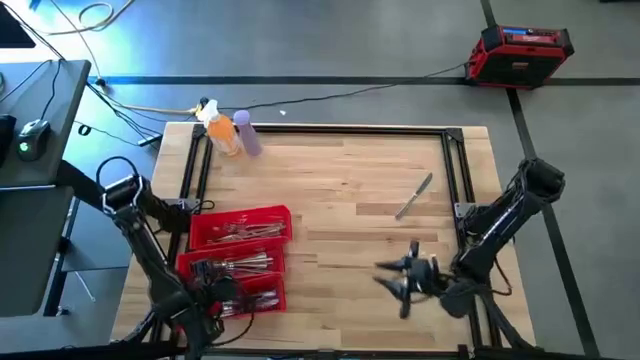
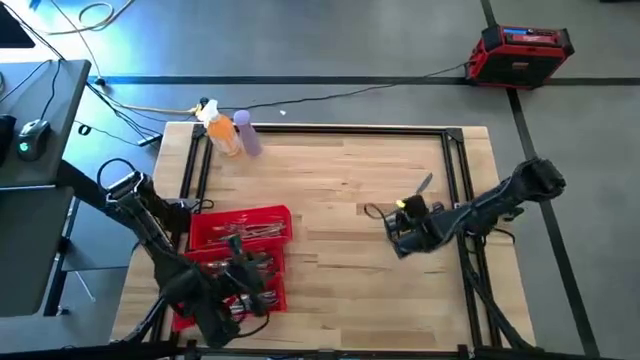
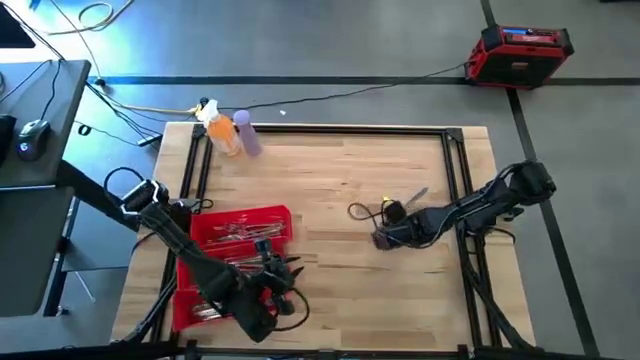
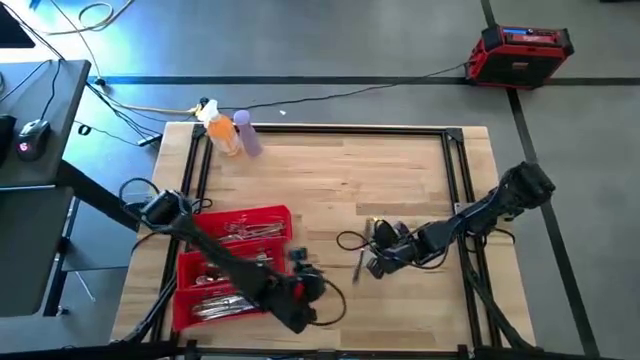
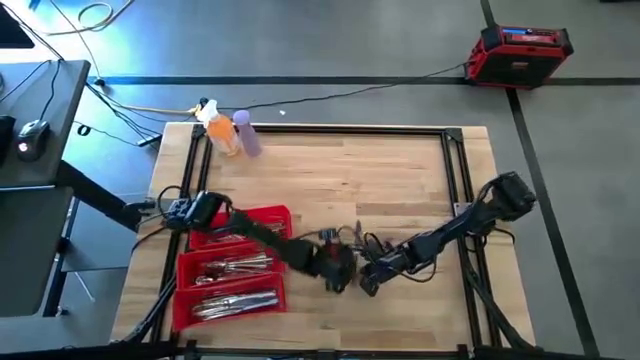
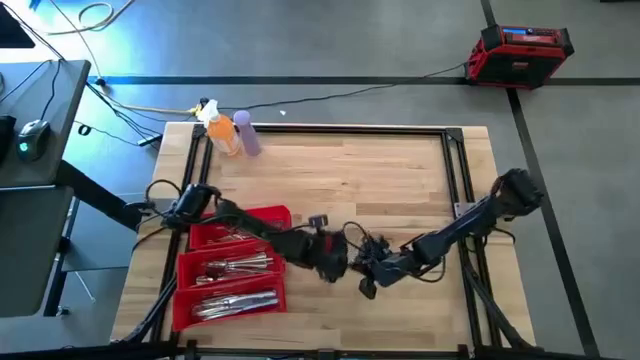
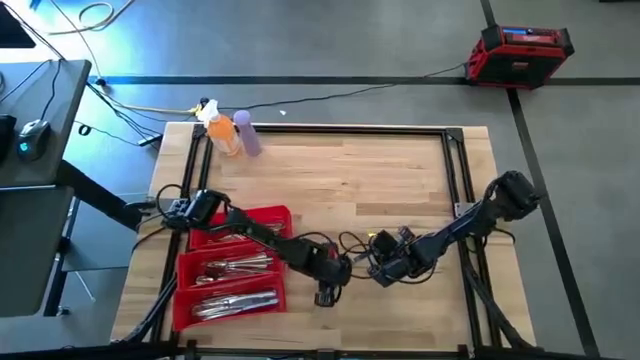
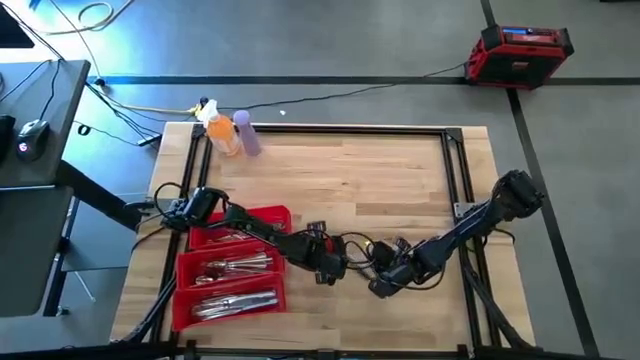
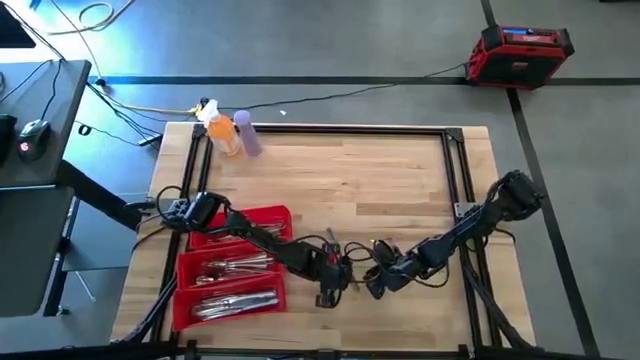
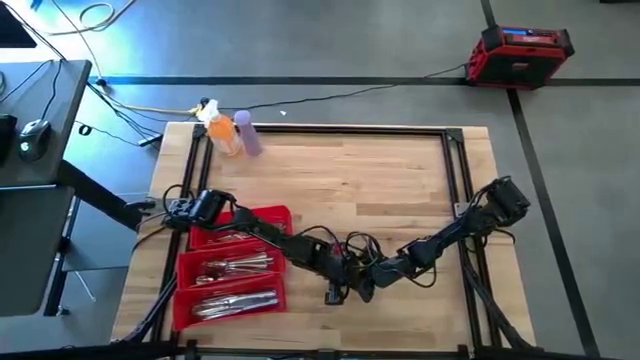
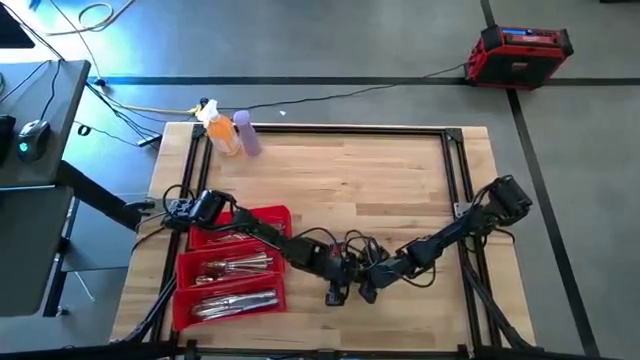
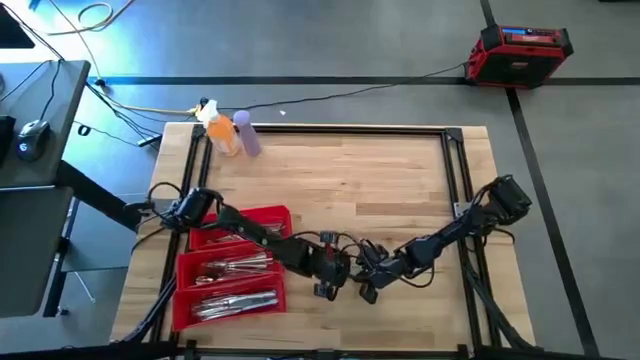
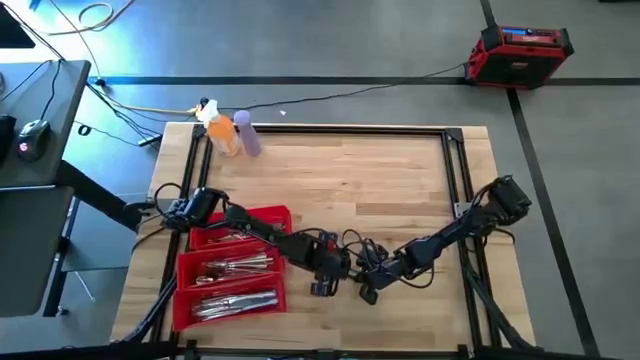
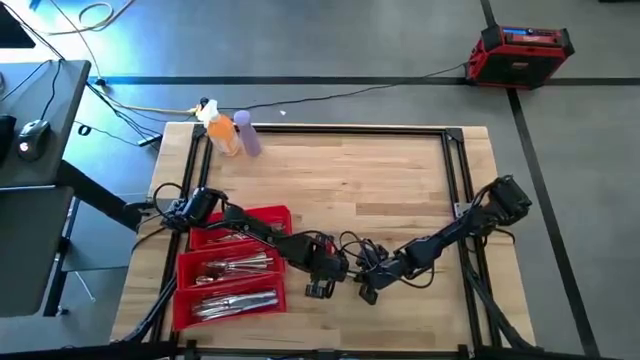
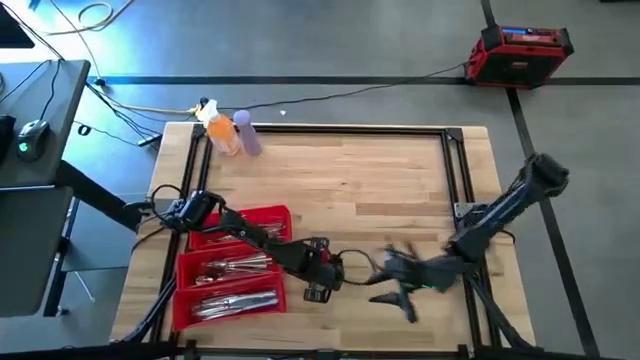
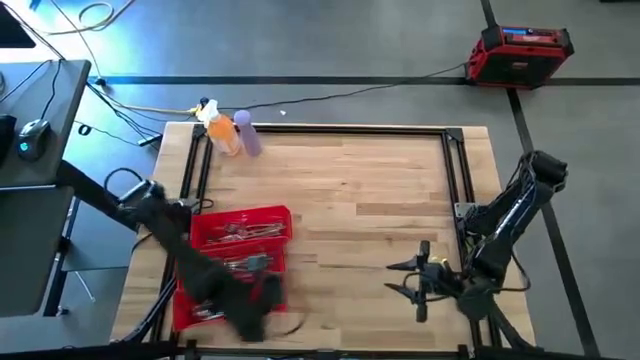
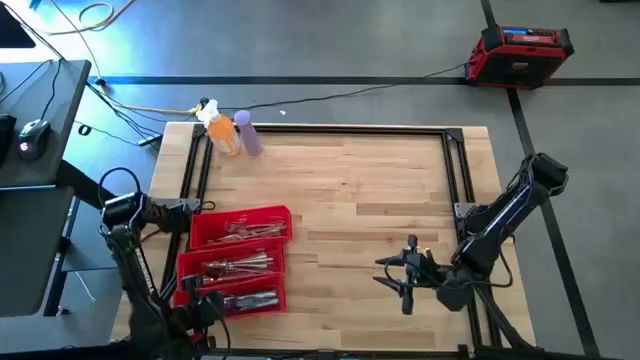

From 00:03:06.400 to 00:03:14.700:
Task: Sort silverware
Put the silver knife in the bottom red bin

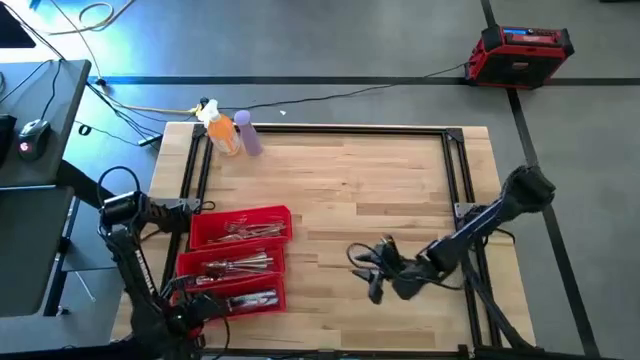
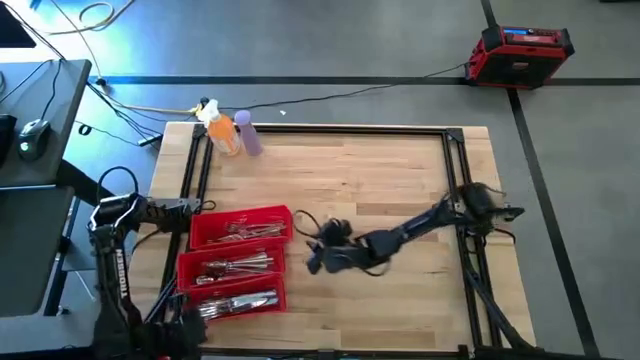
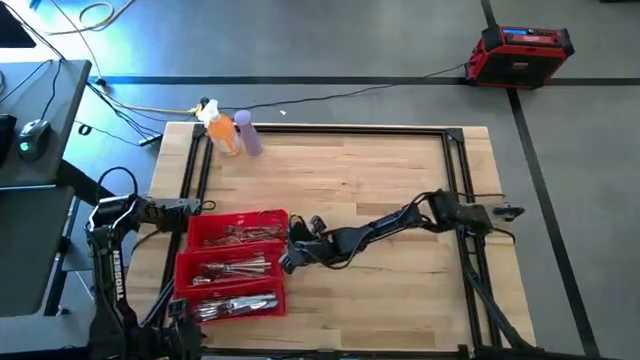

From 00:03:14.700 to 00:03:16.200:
Adjust the top red bin

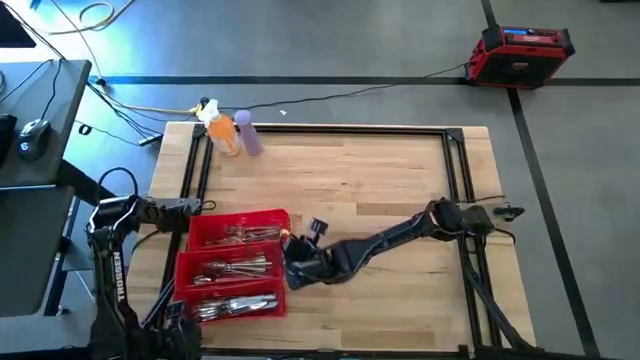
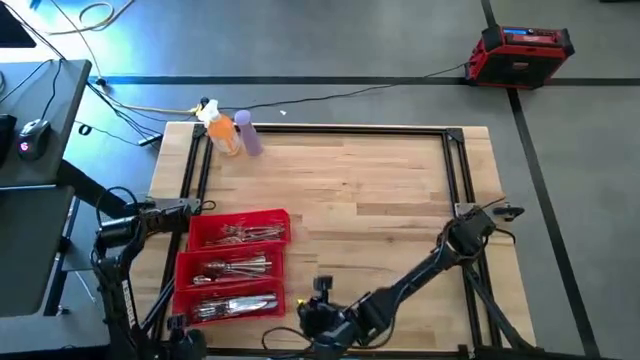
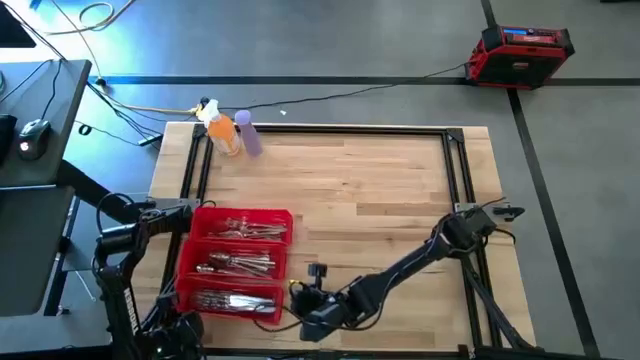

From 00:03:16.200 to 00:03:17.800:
Adjust the bottom red bin

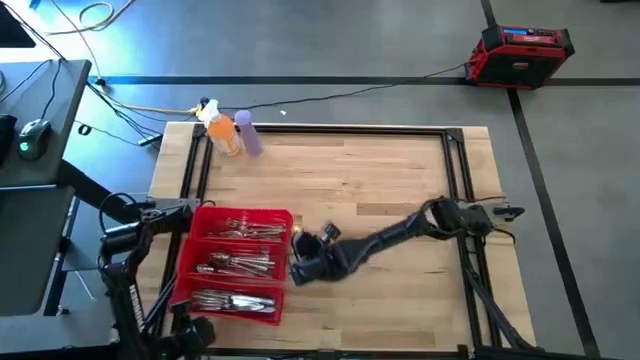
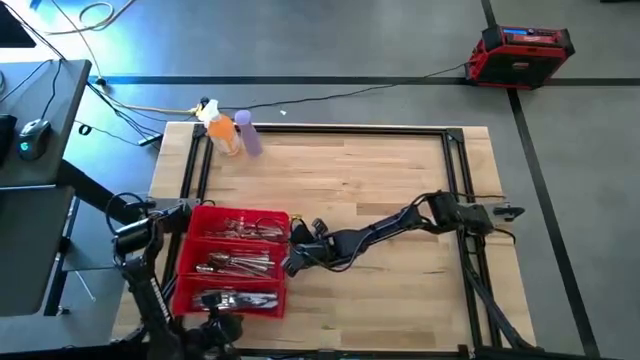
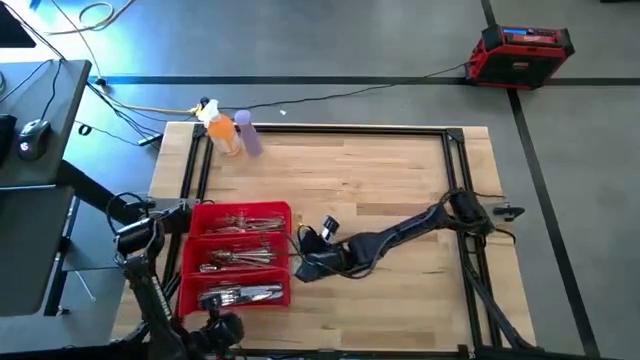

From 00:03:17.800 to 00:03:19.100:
Adjust the bins

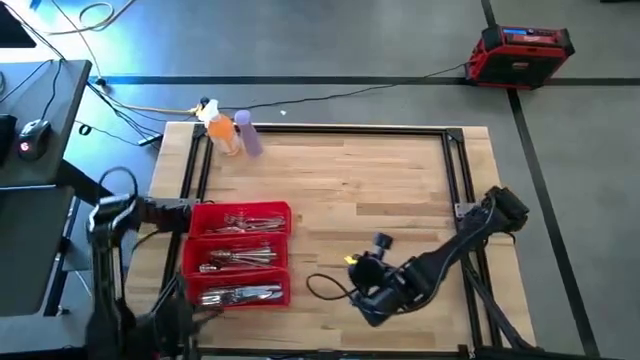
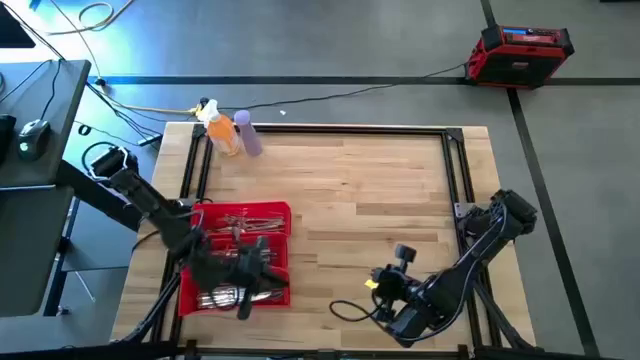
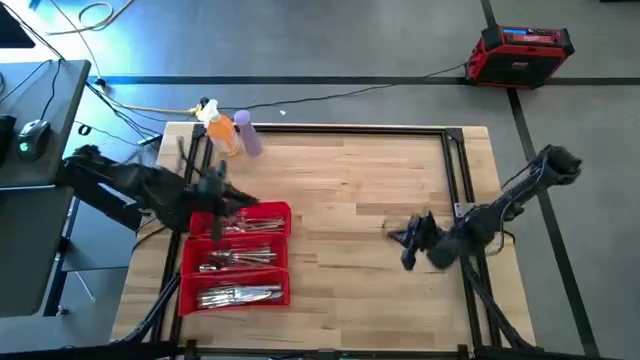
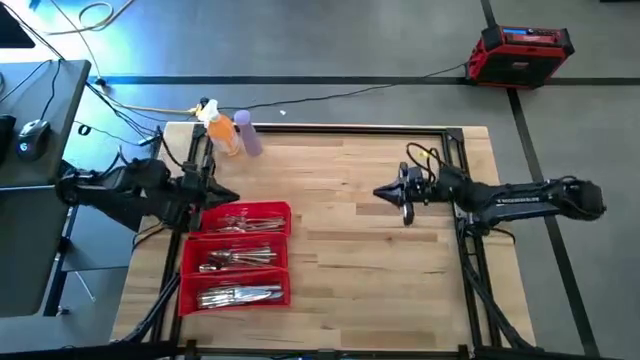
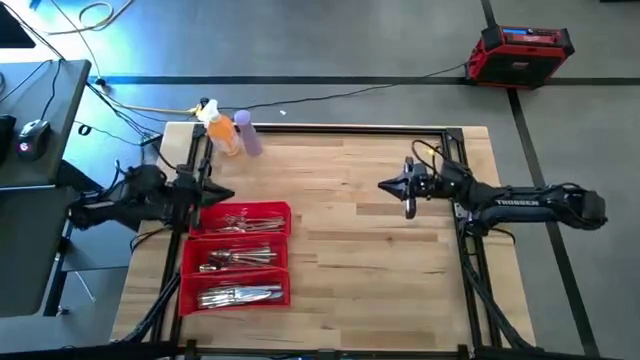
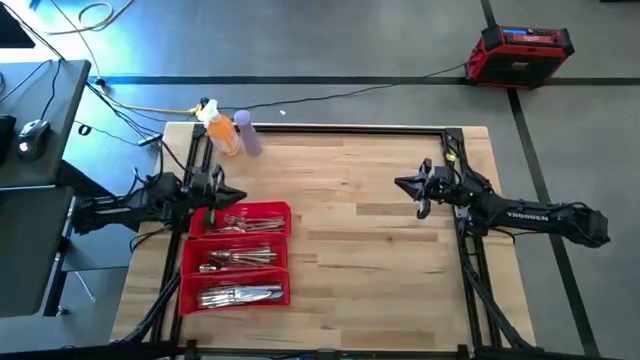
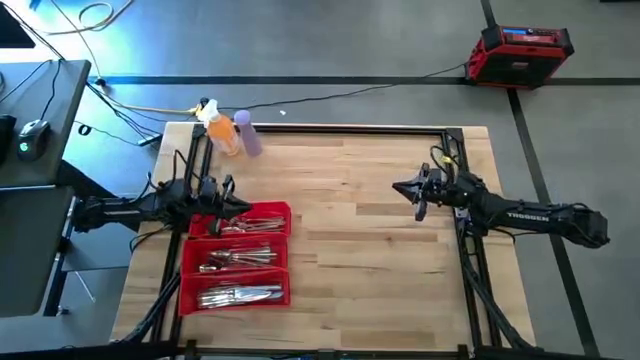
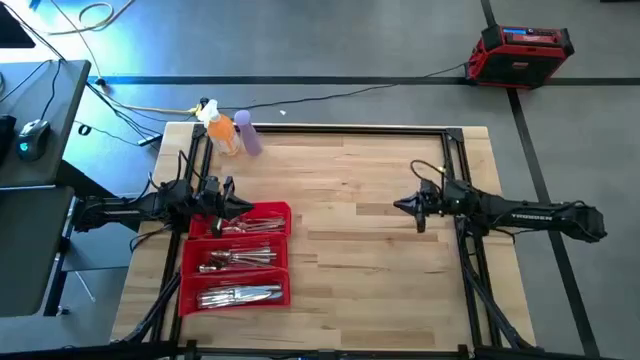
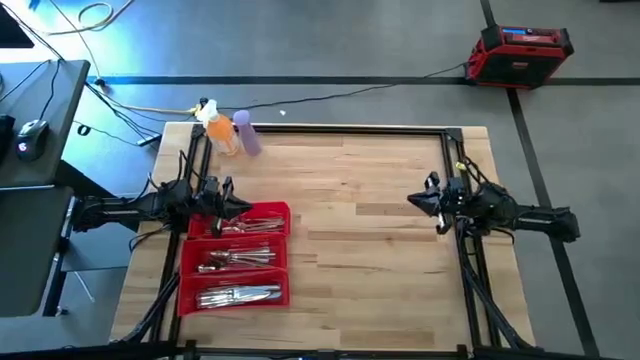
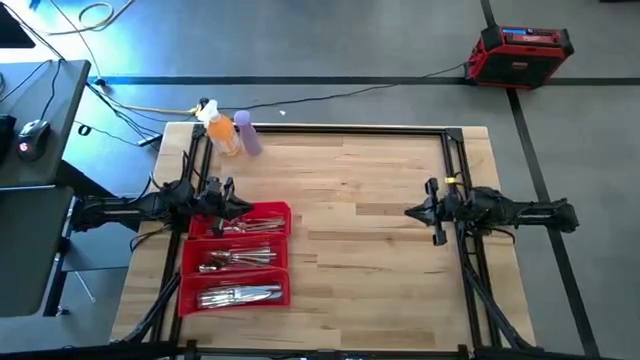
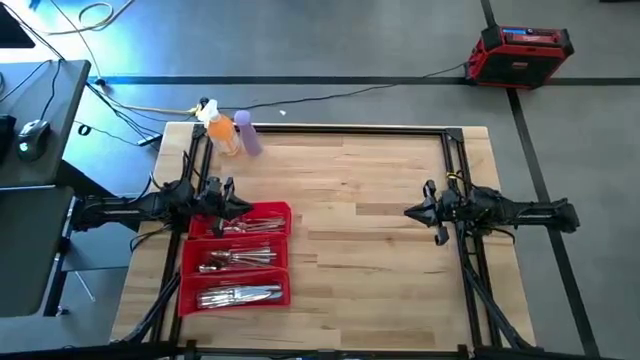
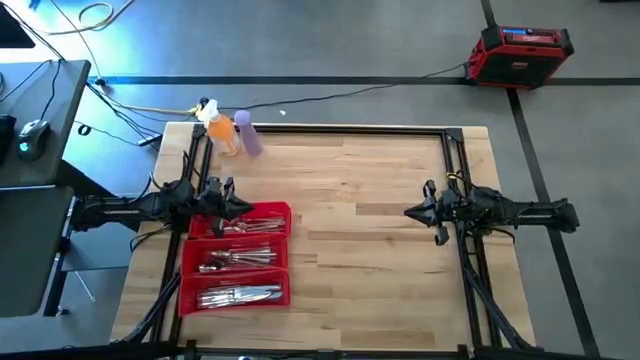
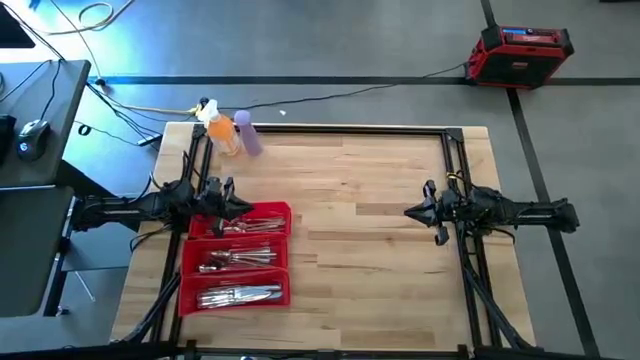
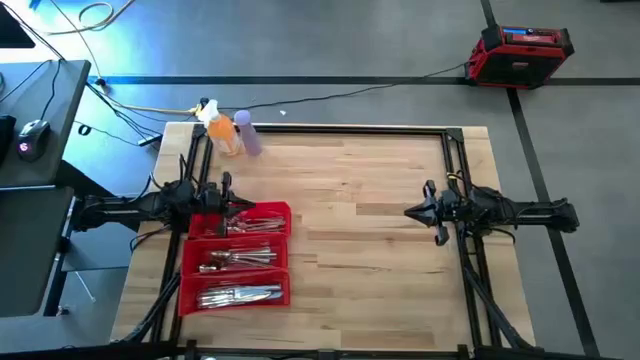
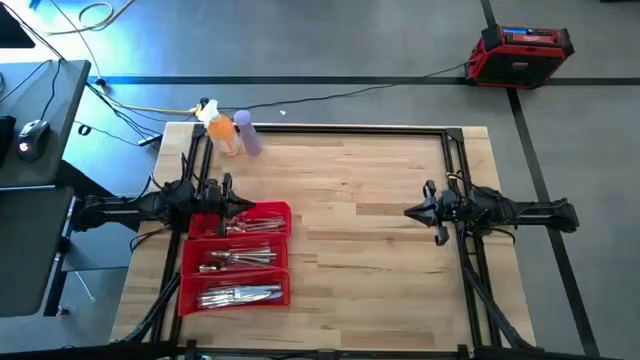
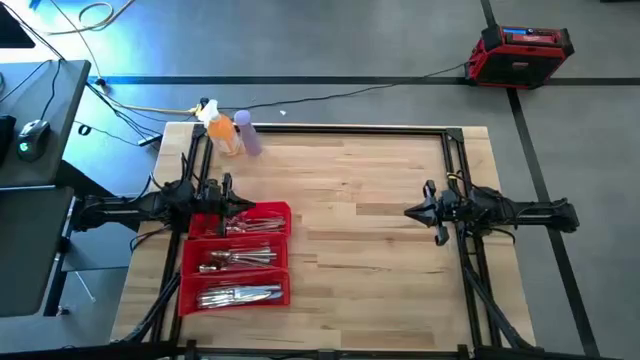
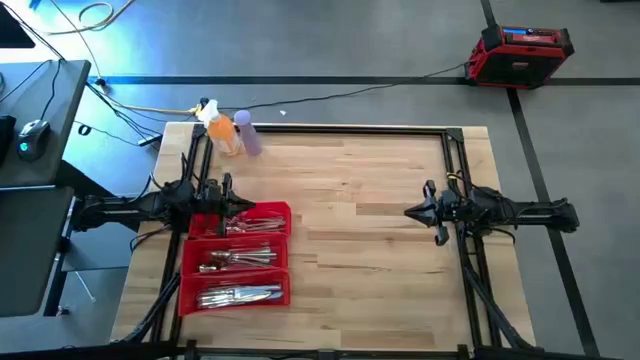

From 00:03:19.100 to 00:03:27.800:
Return to Home Position
